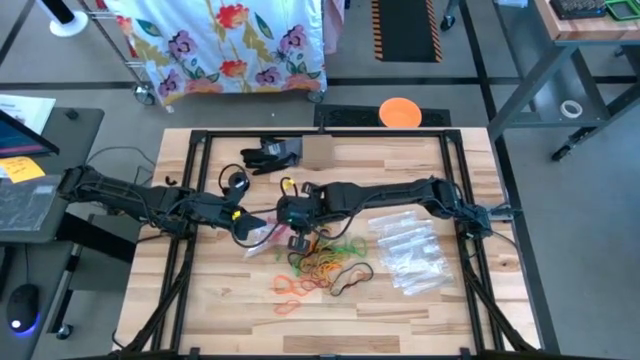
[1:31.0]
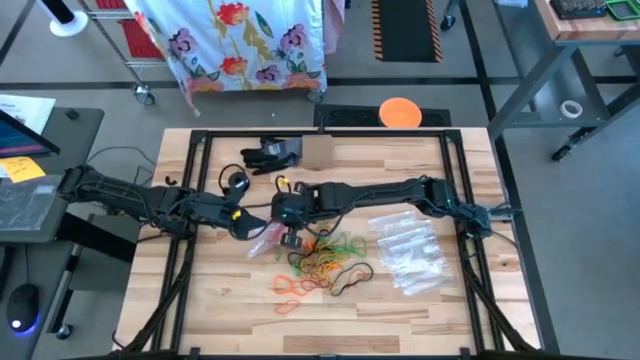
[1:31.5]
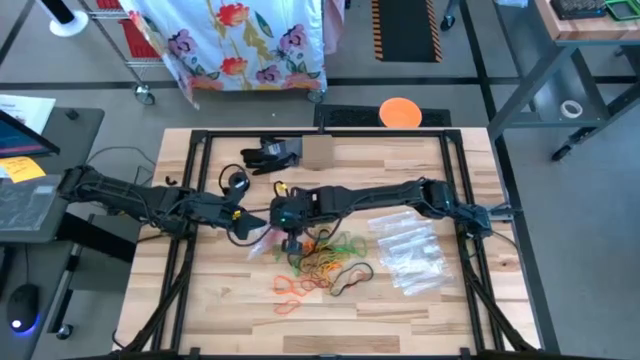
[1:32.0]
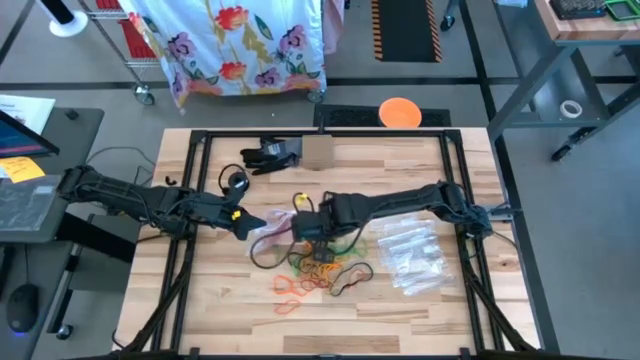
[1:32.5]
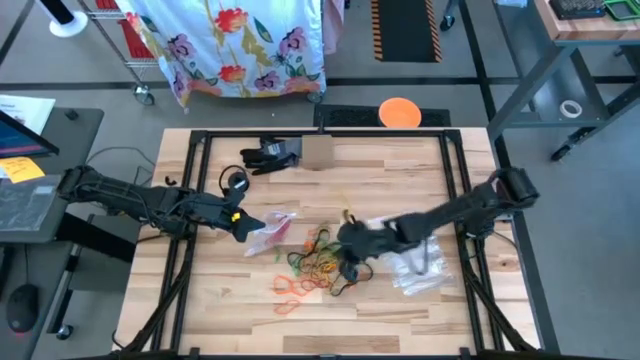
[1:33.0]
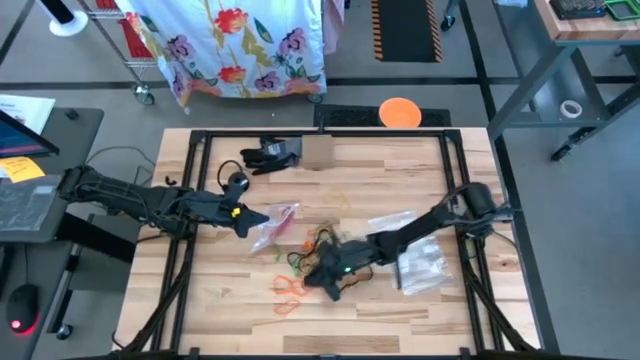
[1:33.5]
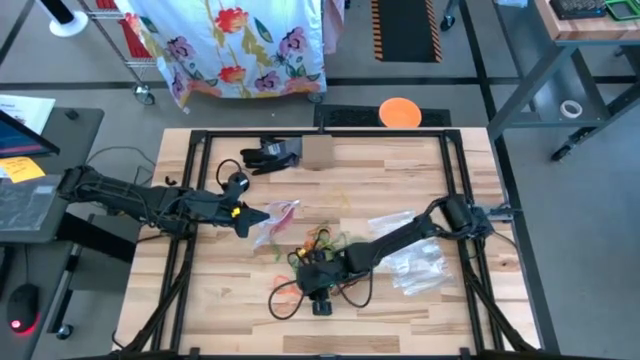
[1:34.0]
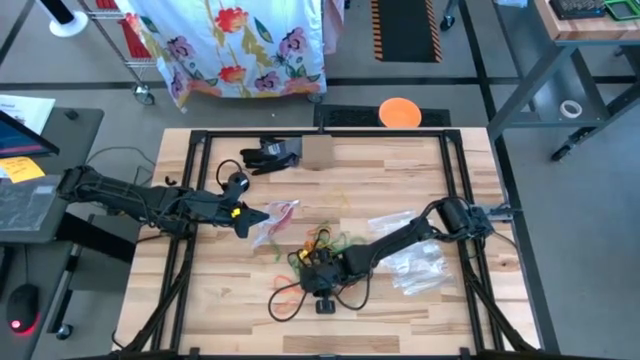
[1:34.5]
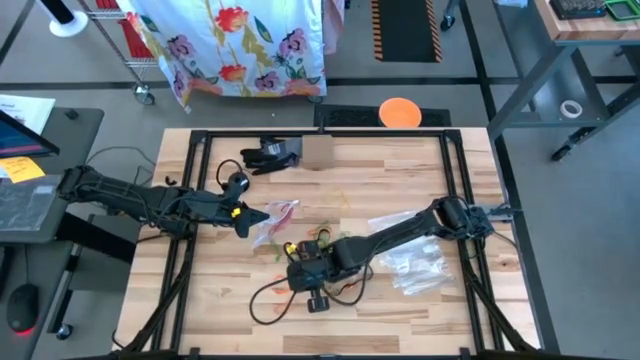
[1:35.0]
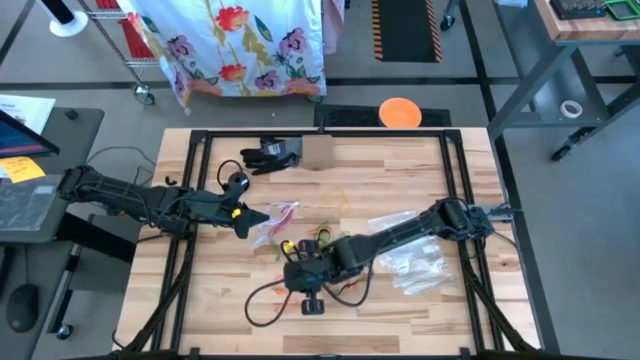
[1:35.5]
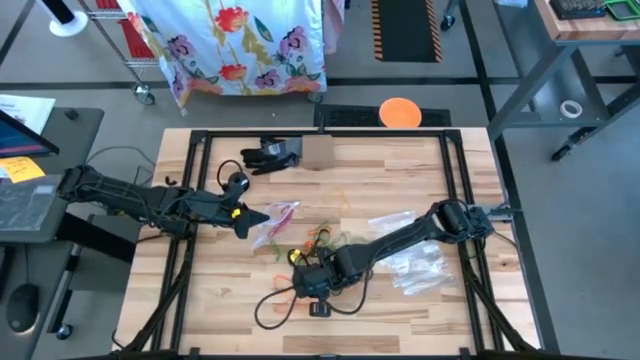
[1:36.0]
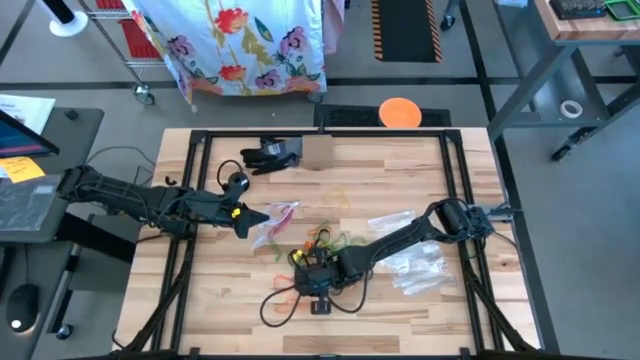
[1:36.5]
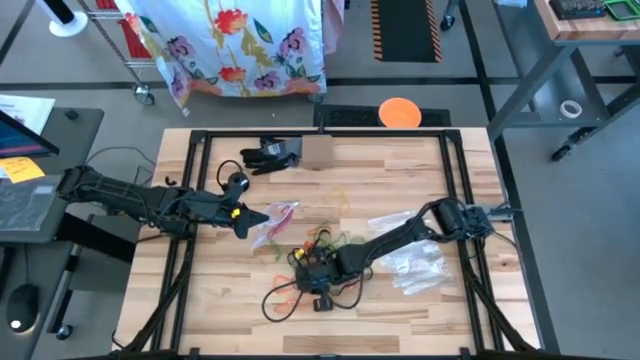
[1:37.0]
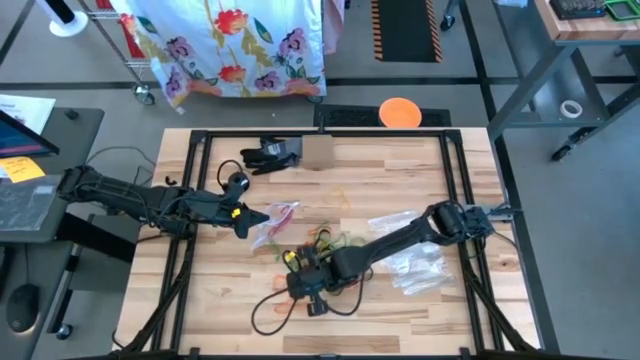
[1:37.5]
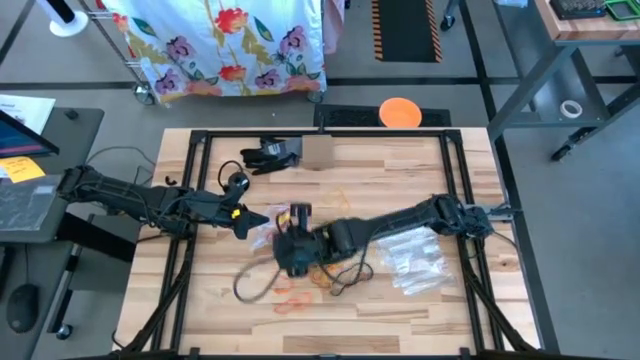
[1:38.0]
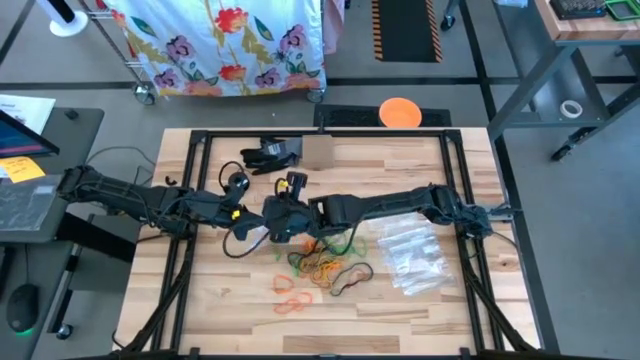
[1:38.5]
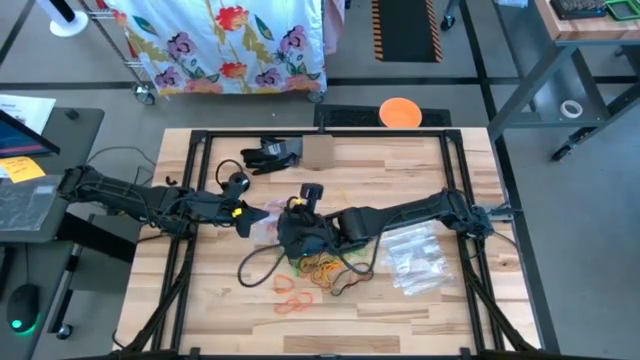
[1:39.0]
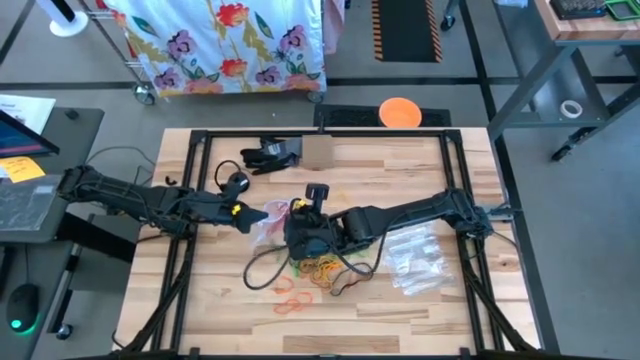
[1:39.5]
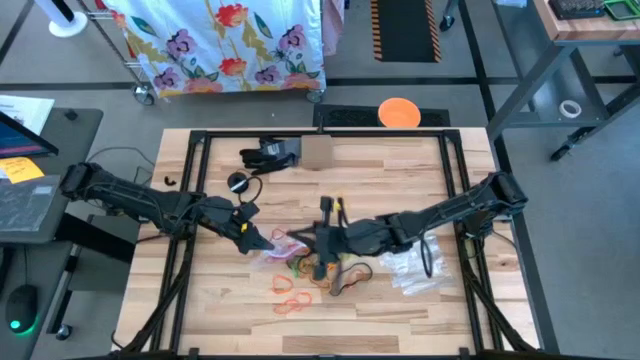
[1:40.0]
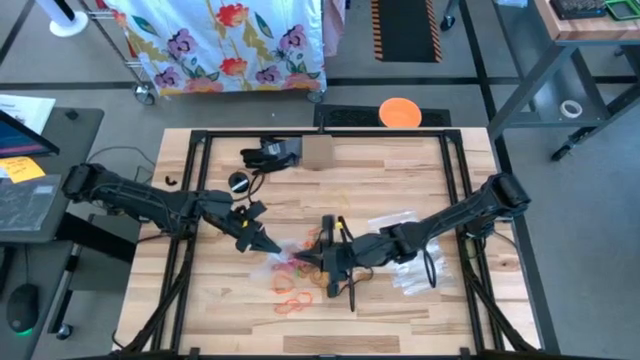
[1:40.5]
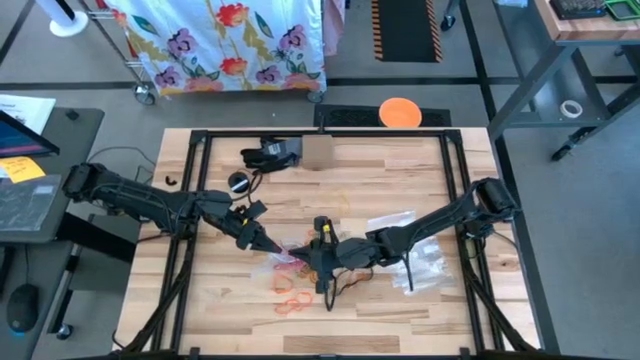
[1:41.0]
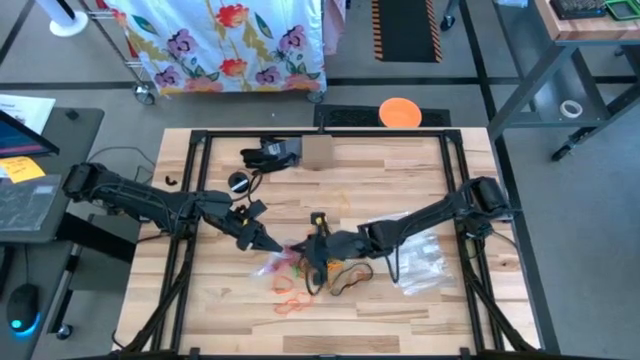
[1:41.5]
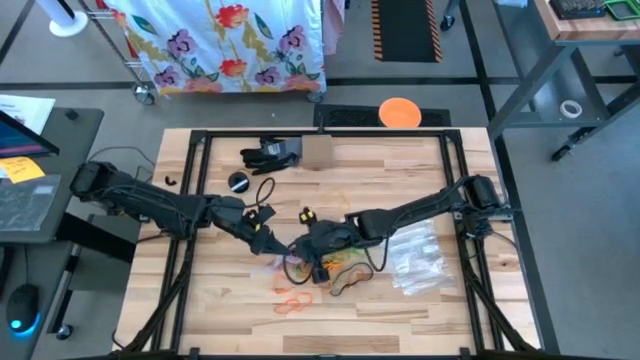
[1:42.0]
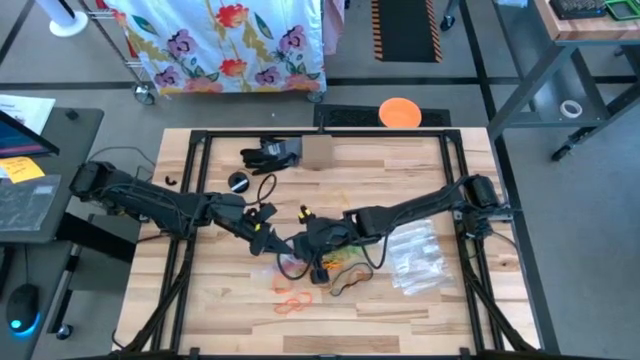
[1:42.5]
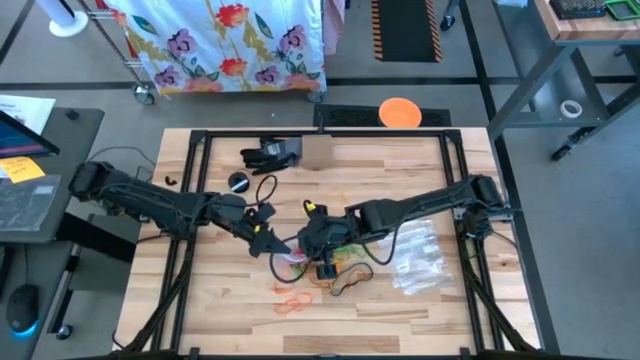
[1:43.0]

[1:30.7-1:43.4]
Task: Sort rubber bands
Put the red rubber band into the transparent zip bag

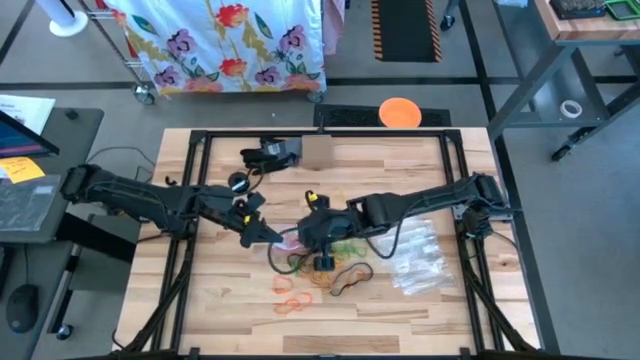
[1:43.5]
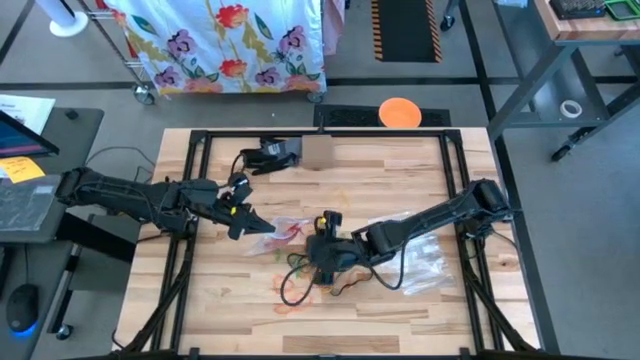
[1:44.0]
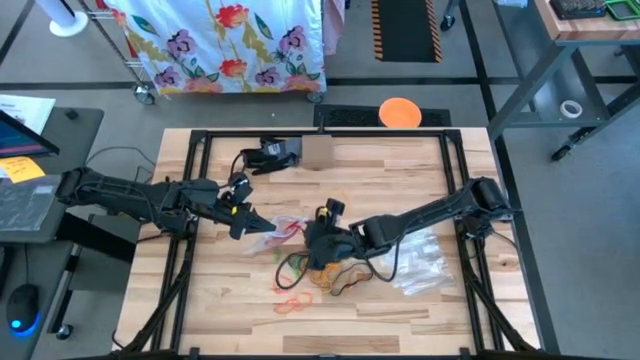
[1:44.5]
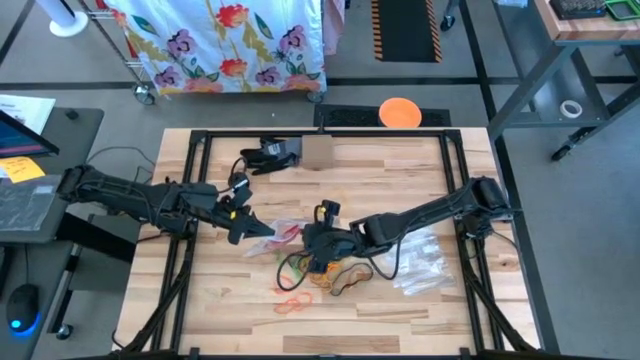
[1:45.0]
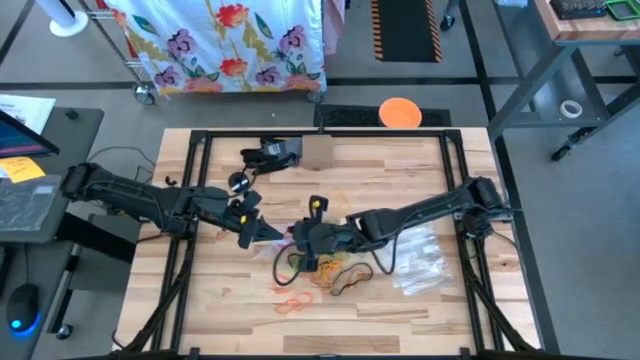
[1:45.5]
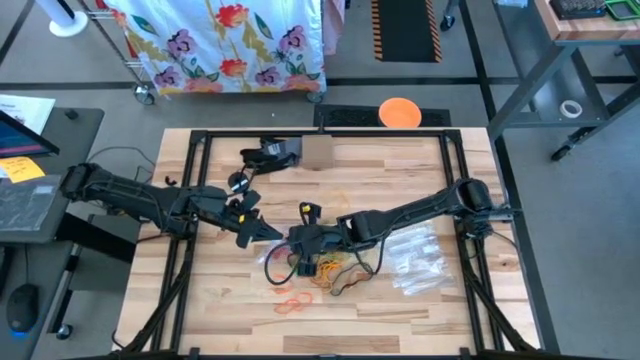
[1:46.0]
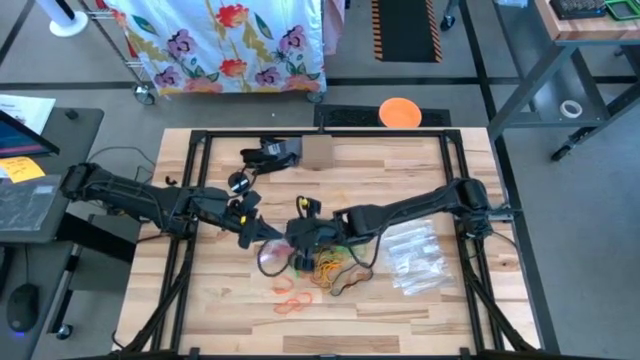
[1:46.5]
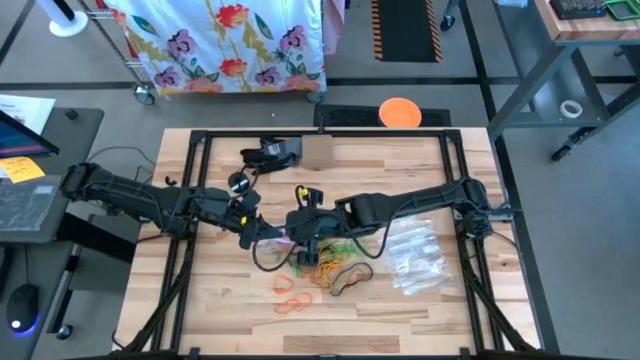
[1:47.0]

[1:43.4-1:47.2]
Put the red rubber band into the transparent zip bag

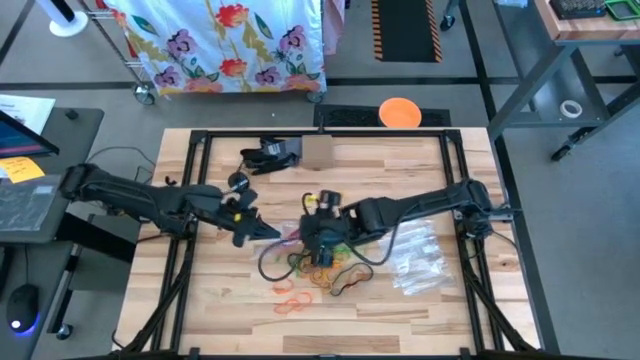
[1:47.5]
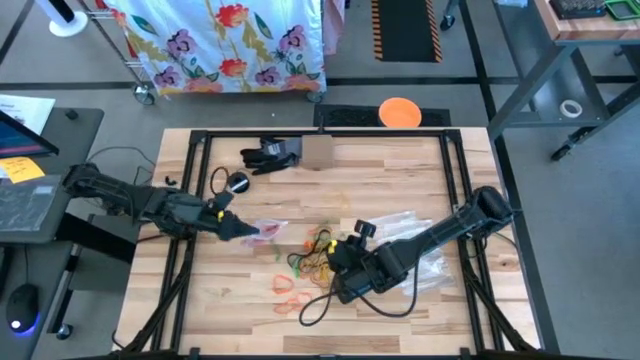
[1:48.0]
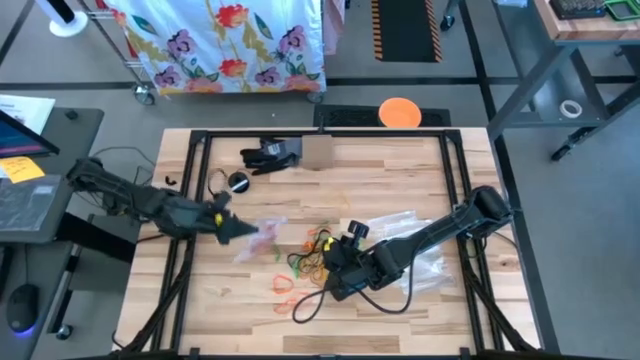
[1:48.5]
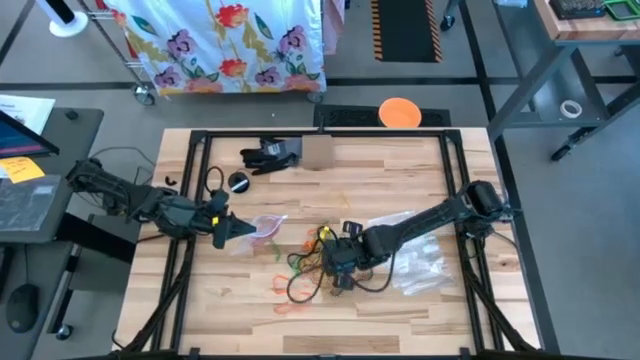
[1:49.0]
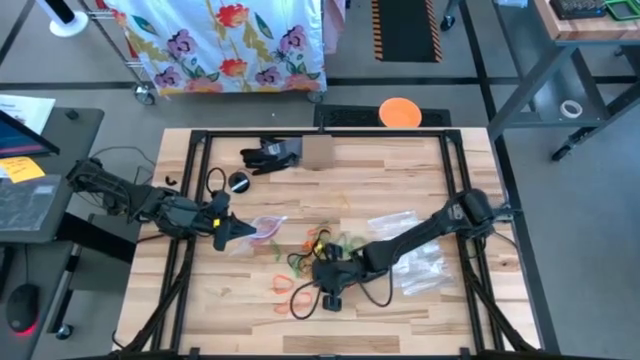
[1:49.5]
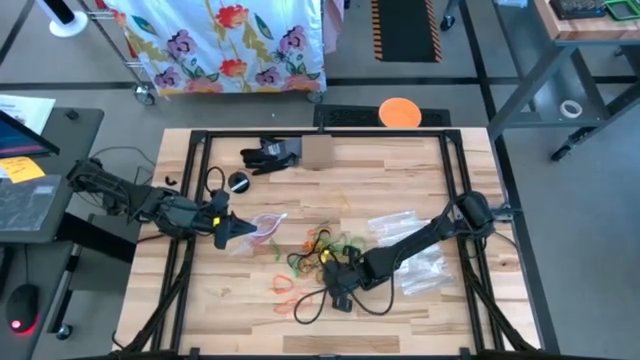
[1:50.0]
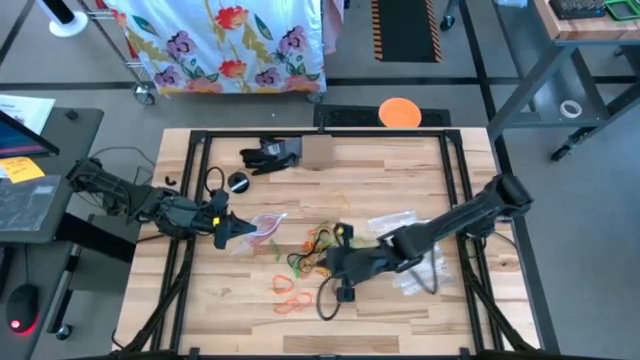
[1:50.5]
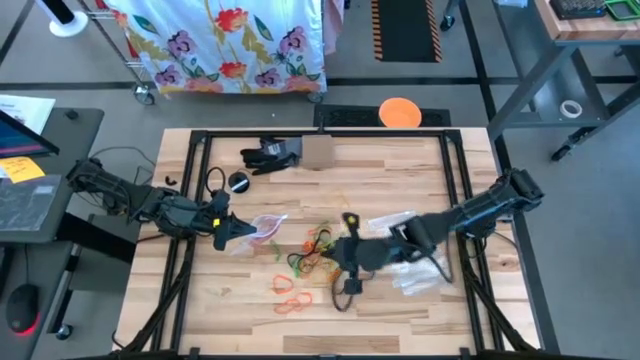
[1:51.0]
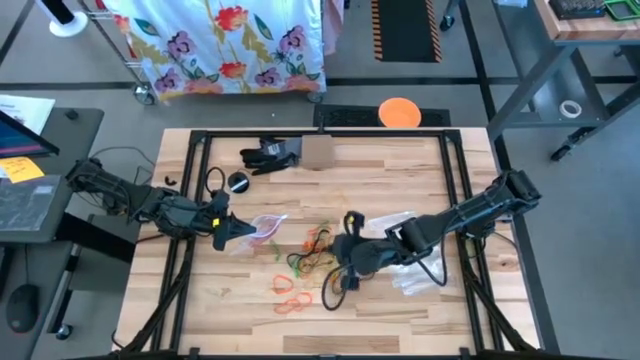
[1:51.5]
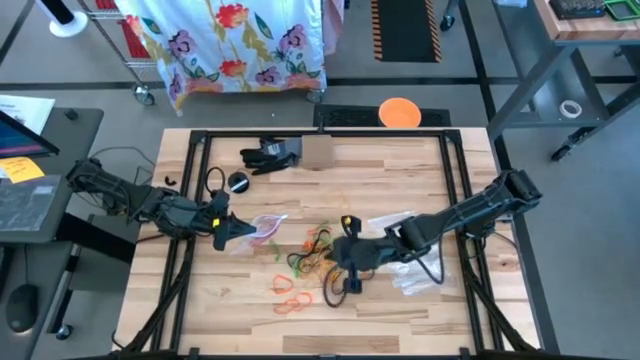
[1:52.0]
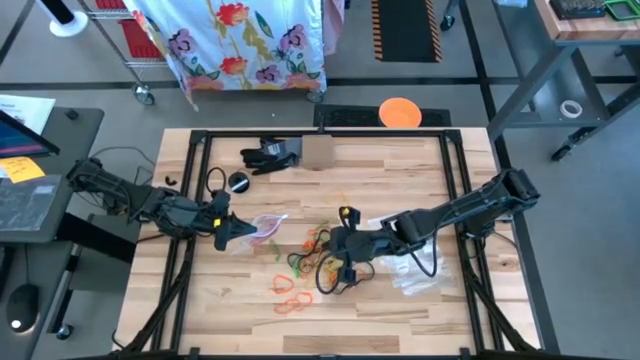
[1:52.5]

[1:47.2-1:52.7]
Put the red rubber band into the transparent zip bag

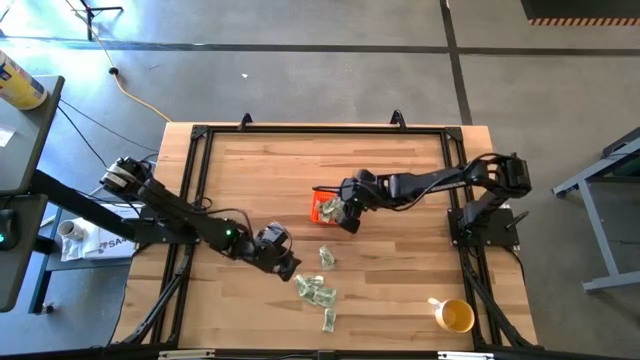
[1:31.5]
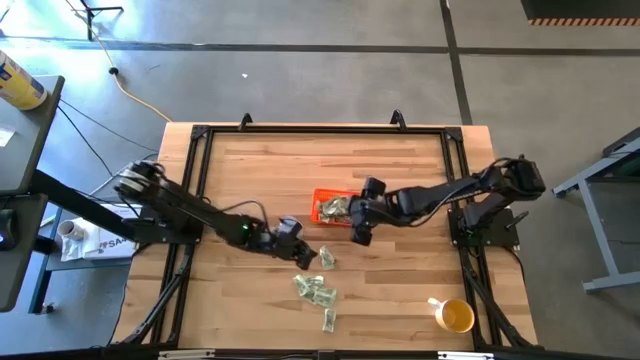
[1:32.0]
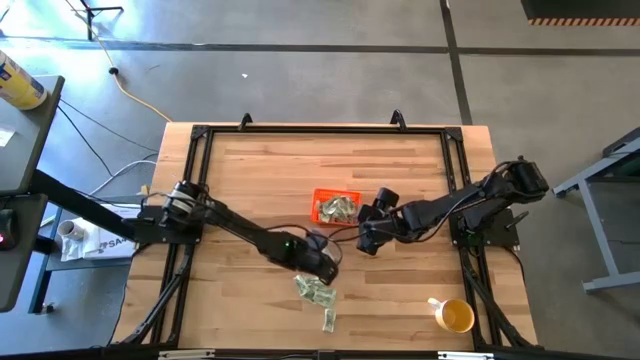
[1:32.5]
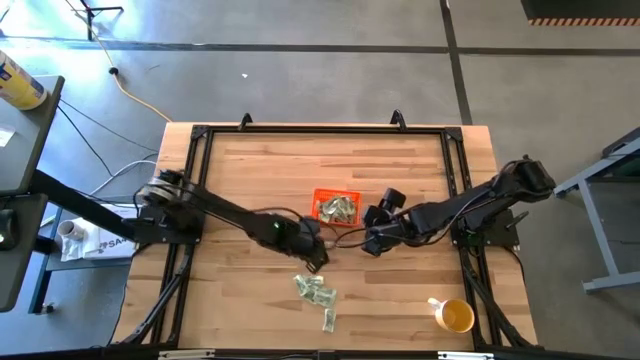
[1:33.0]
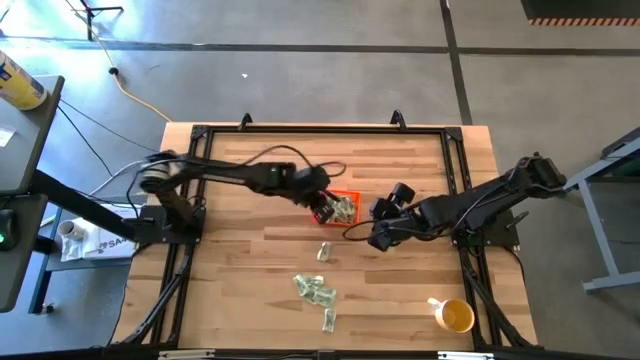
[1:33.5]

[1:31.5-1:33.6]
Task: Pick and place Stevia / Truvia into bins
Put the stevia packet into the orange bin
